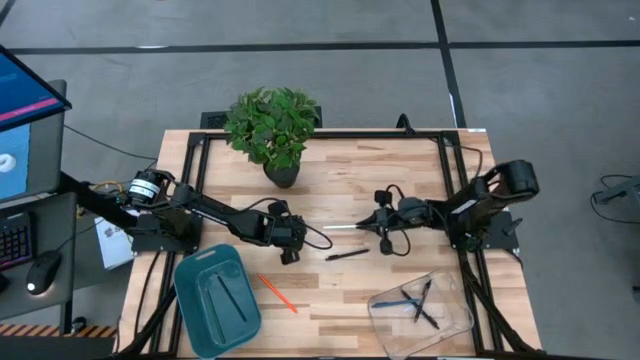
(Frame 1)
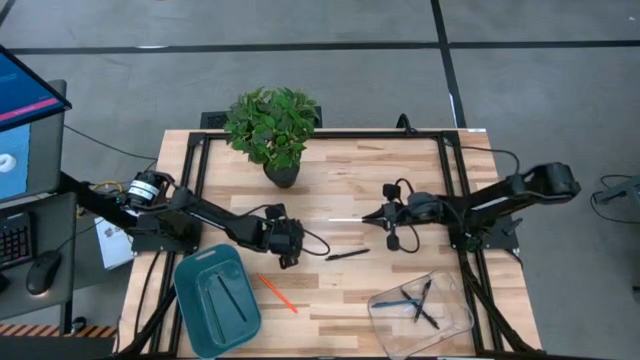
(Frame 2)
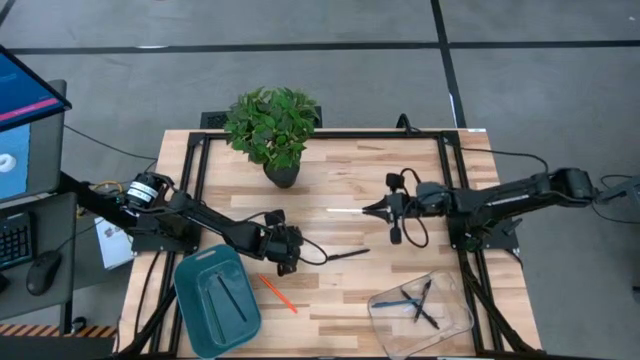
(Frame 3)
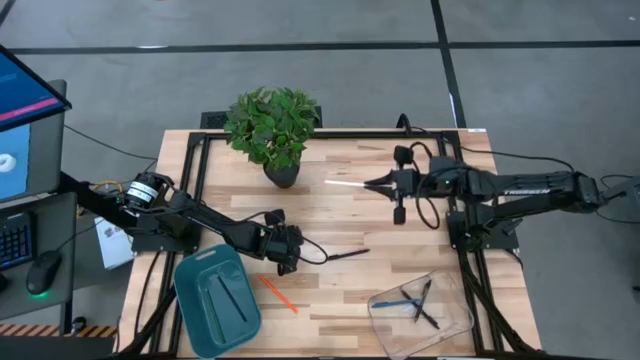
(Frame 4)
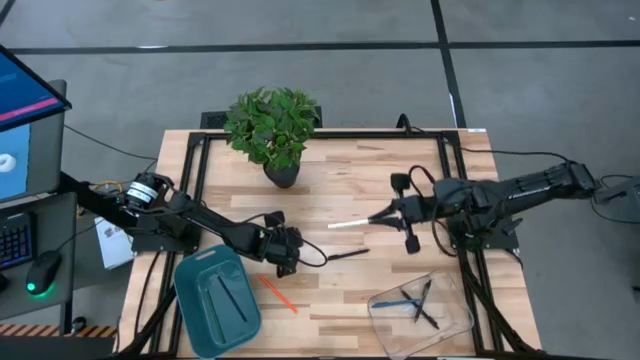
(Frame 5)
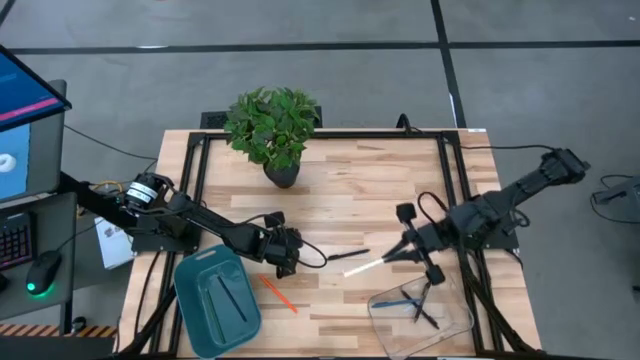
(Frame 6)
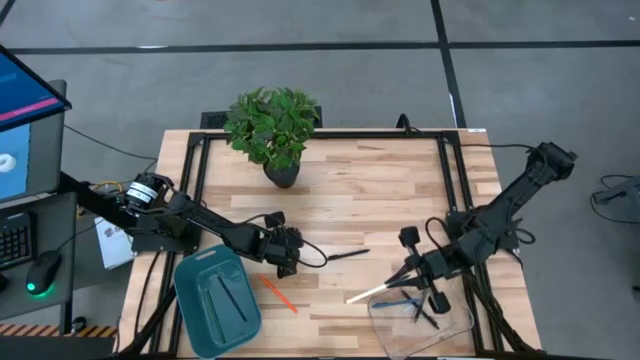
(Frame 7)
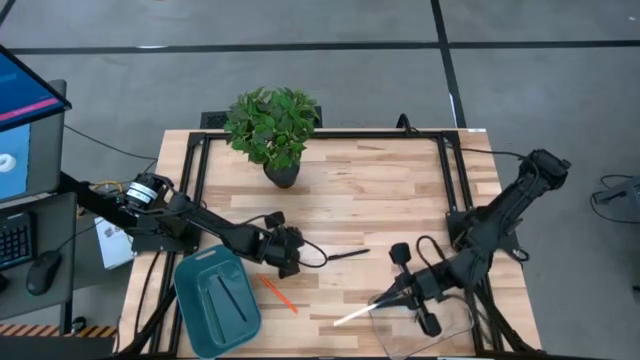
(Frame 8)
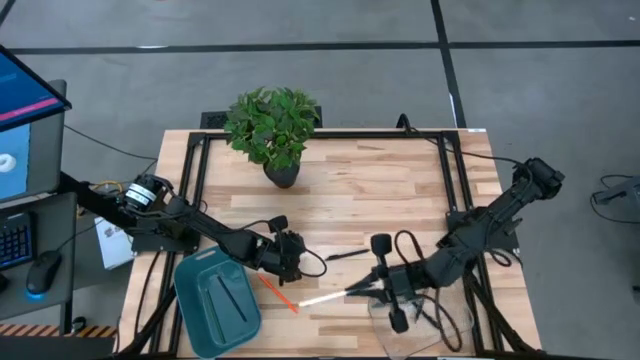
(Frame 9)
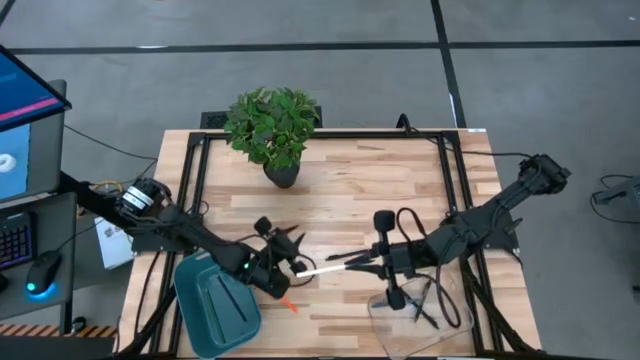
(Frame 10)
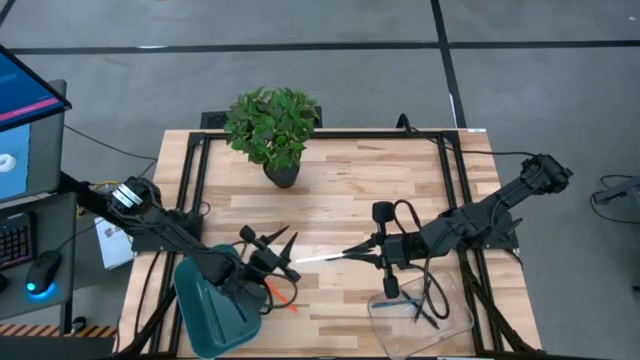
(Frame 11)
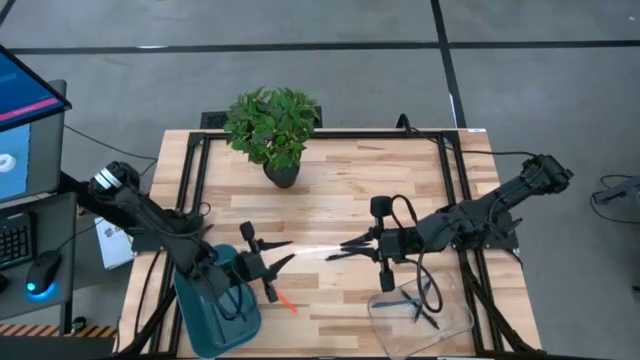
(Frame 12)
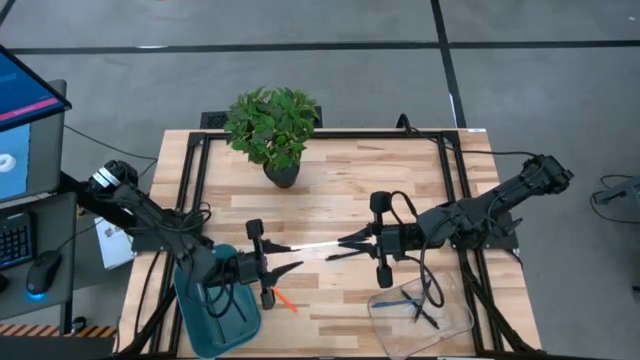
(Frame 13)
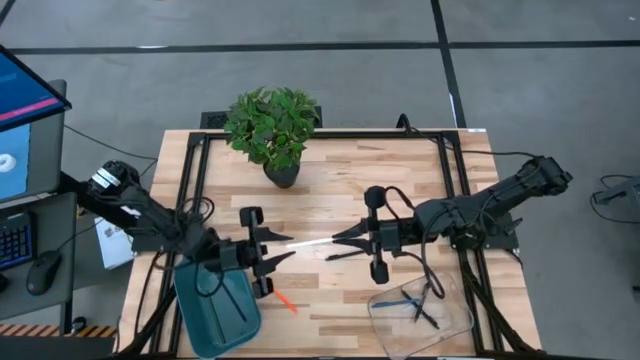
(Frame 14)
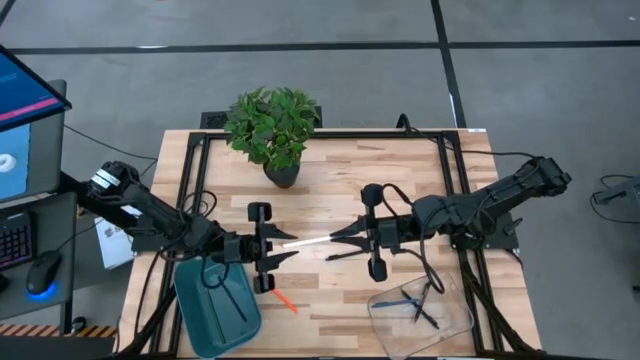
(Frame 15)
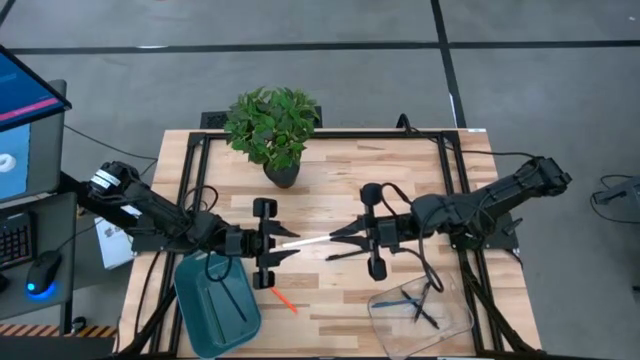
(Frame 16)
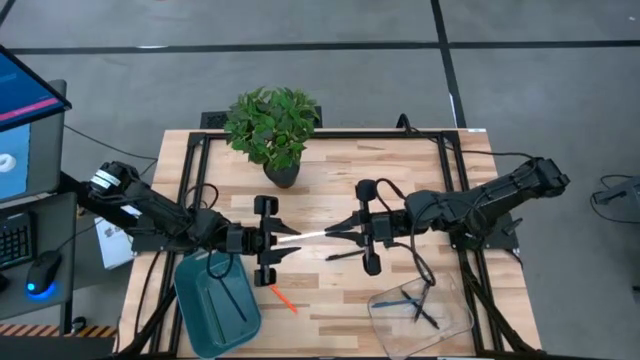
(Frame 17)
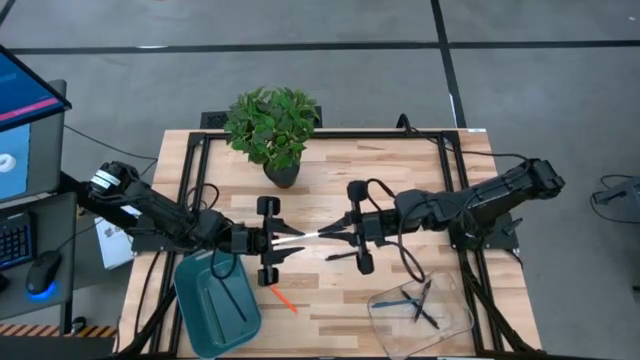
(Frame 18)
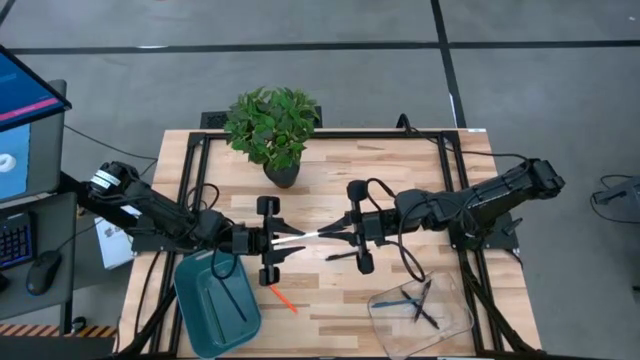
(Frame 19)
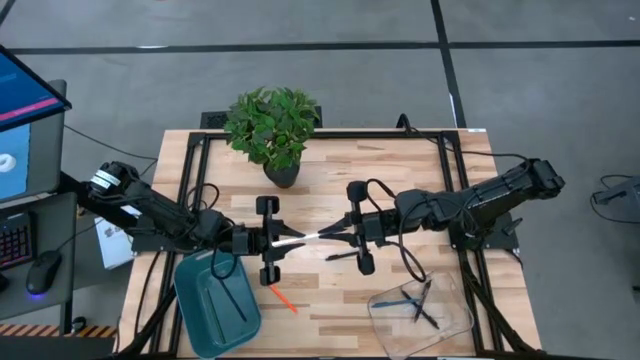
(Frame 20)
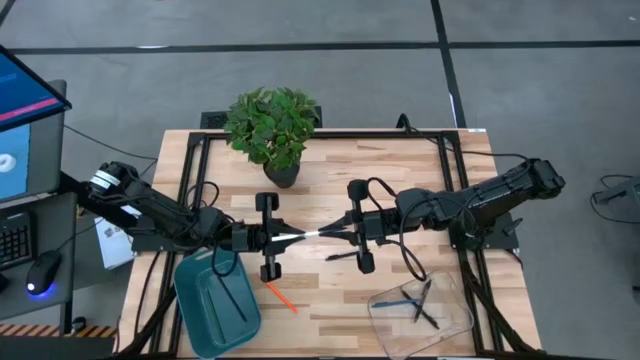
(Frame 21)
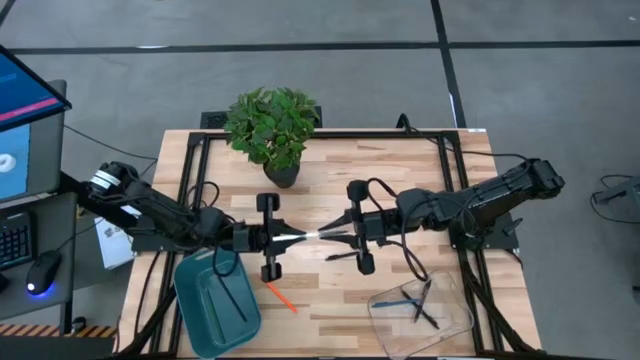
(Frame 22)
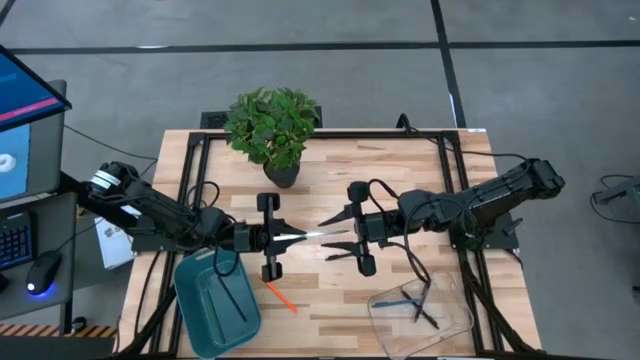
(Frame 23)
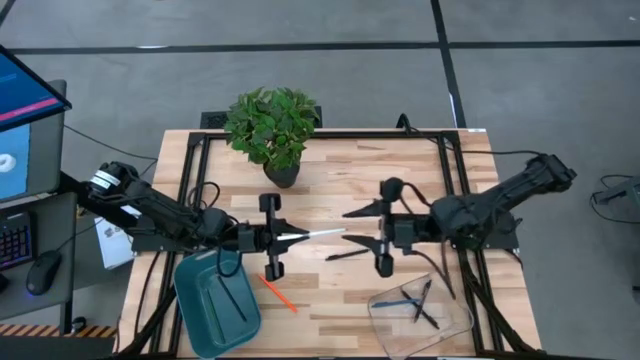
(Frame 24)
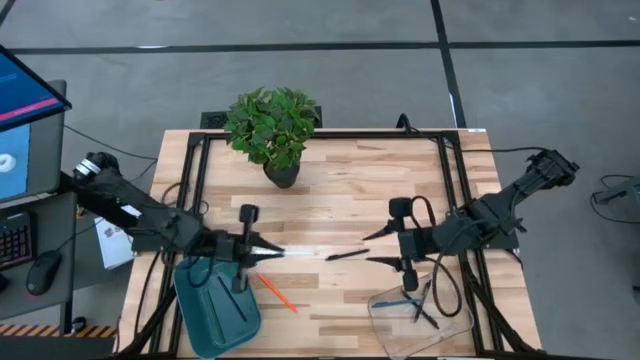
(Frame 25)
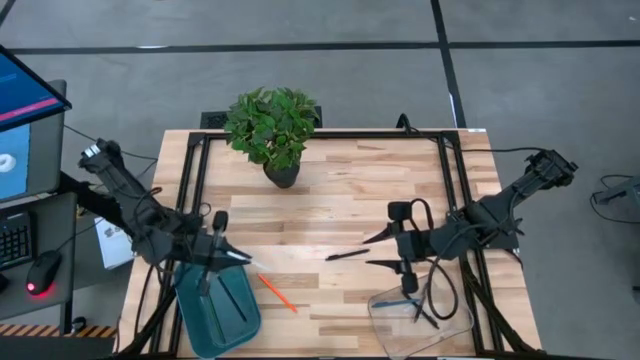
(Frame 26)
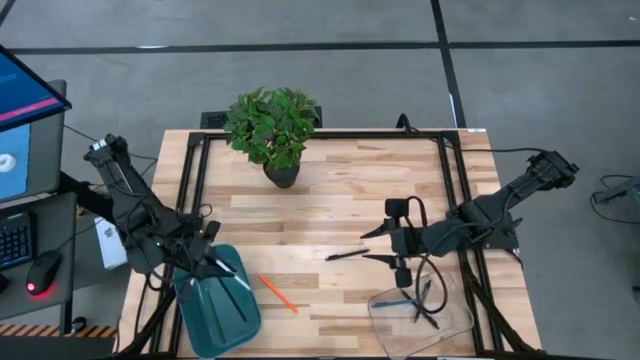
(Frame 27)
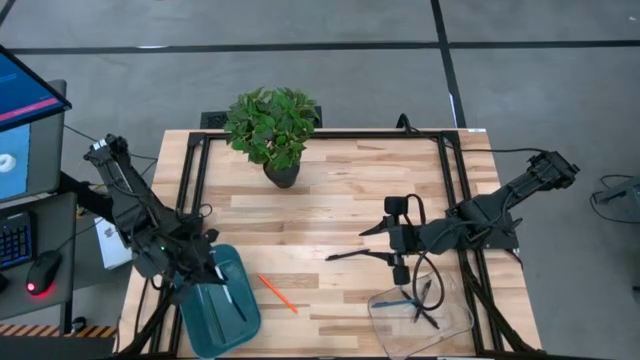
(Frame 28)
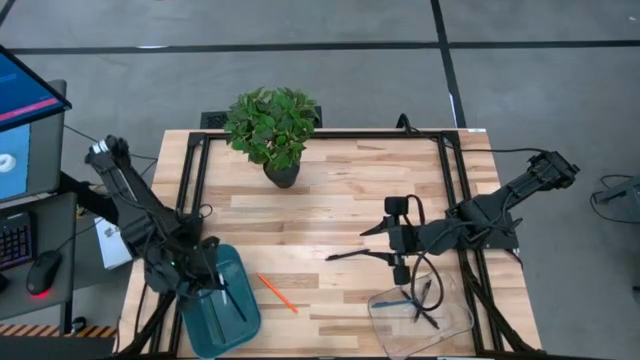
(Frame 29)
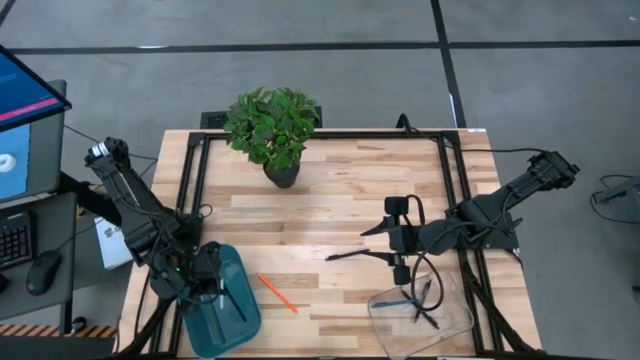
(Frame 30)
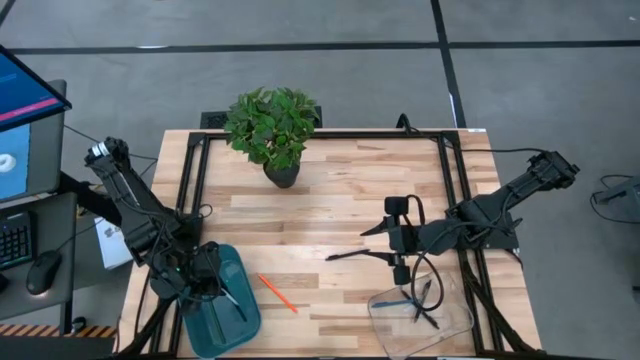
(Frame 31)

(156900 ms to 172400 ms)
Task: Sort pens & pencils
Put the white pencil into the blue bin

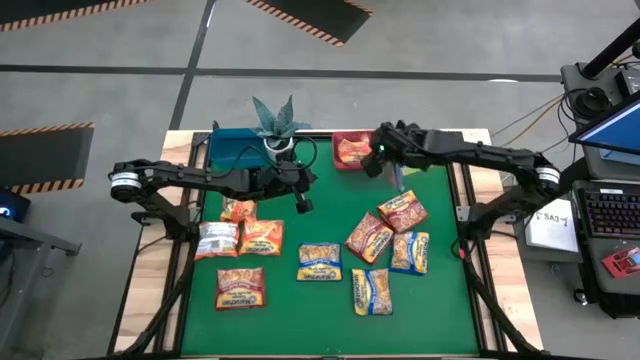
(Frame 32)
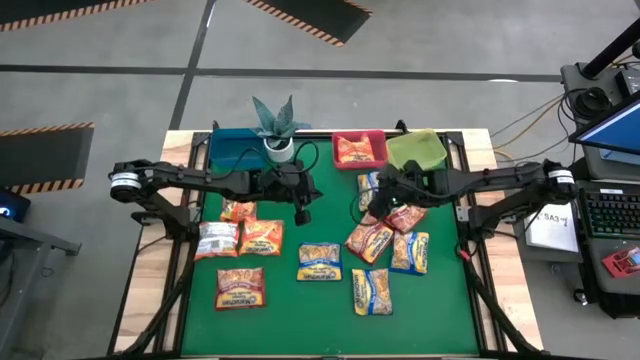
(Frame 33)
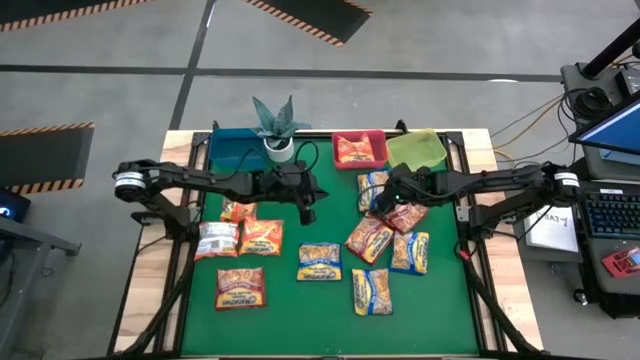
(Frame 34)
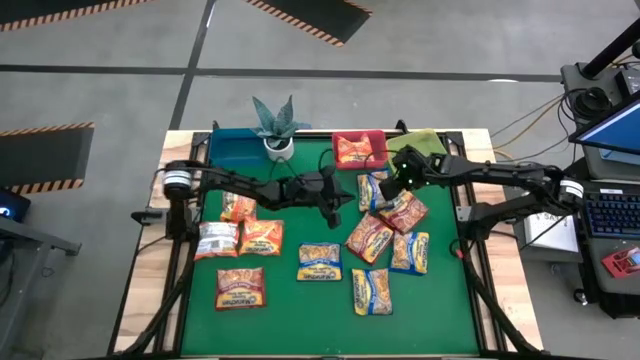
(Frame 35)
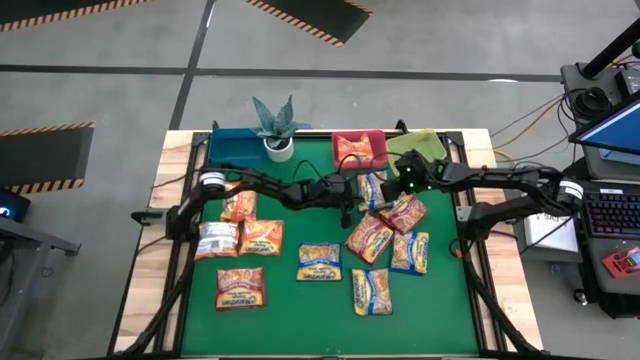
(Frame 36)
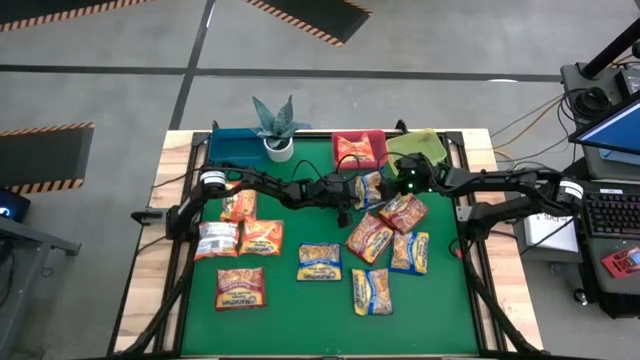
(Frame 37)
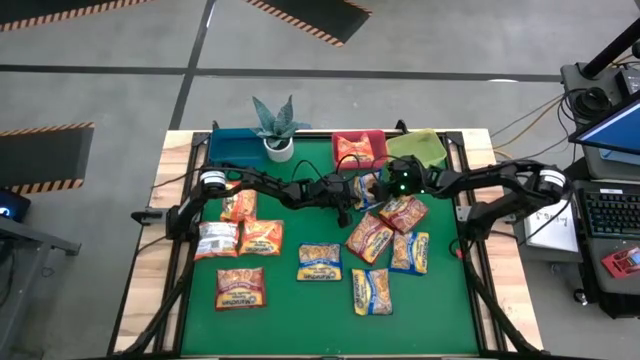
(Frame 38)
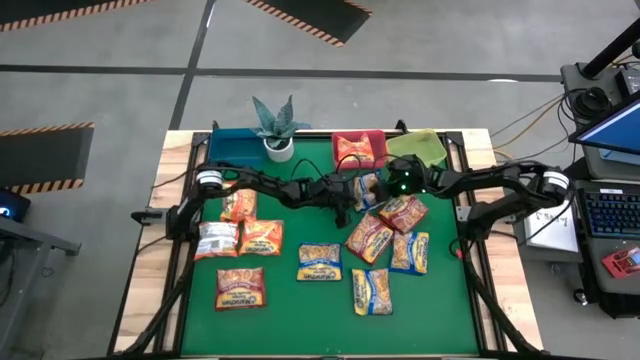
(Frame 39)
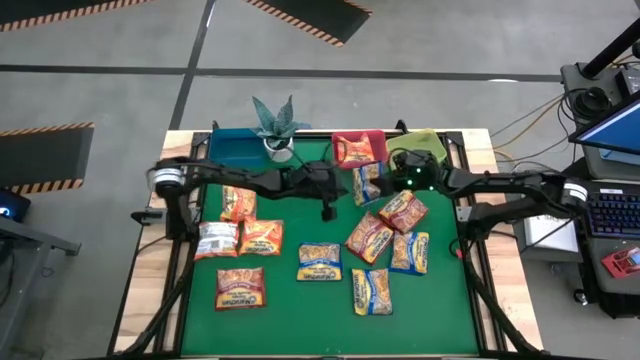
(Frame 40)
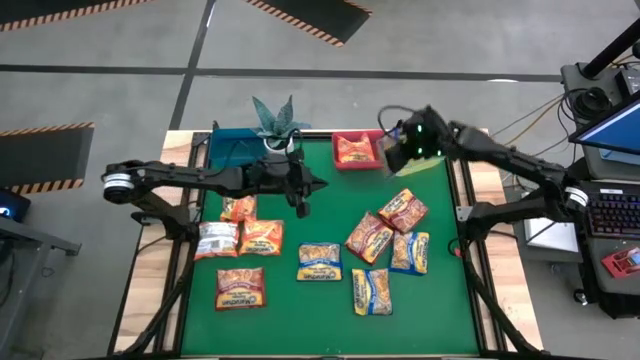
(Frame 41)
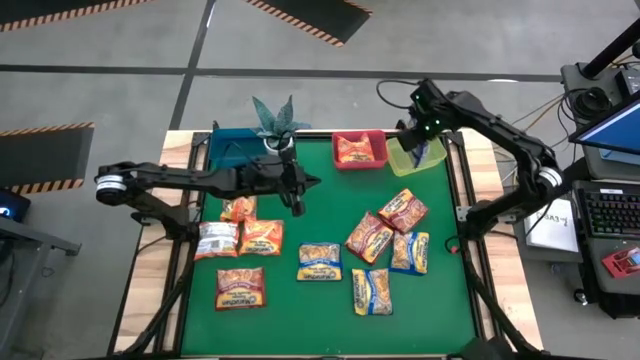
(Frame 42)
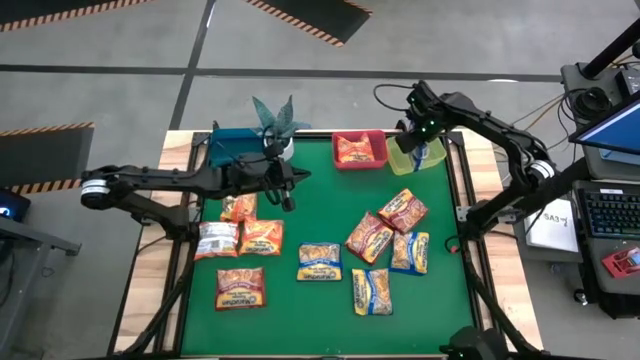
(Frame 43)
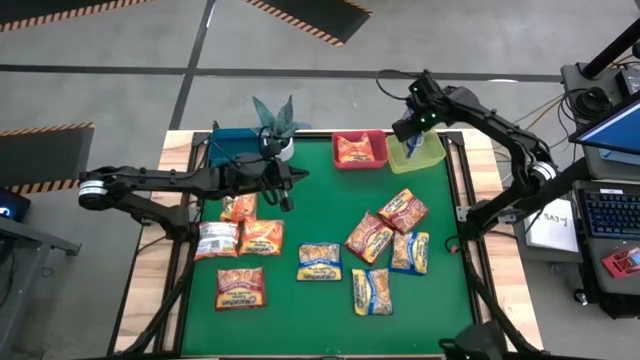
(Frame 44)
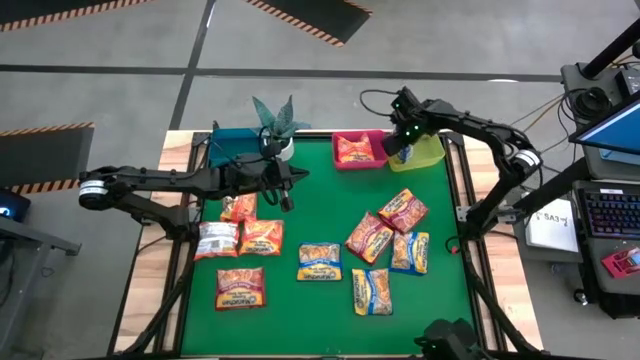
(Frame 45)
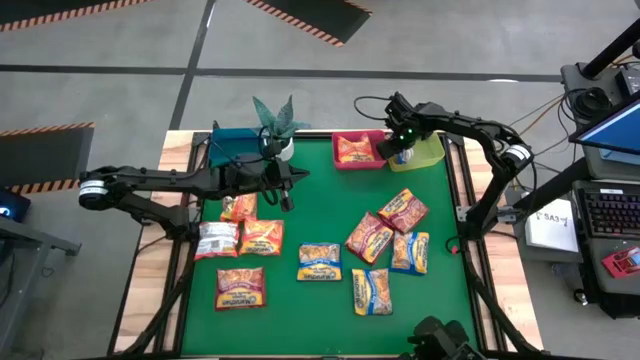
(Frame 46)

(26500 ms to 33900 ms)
Task: Sort Maruchan noodles
Put the blue noodle pack into the yellow bin
